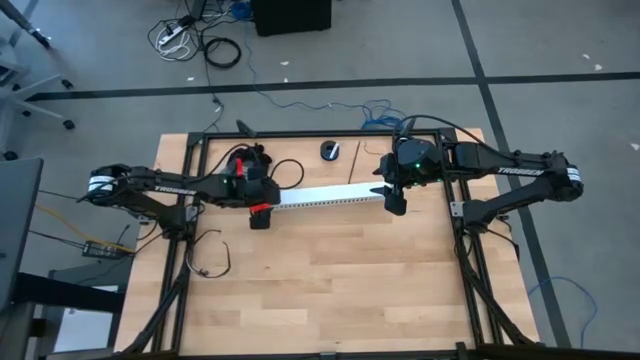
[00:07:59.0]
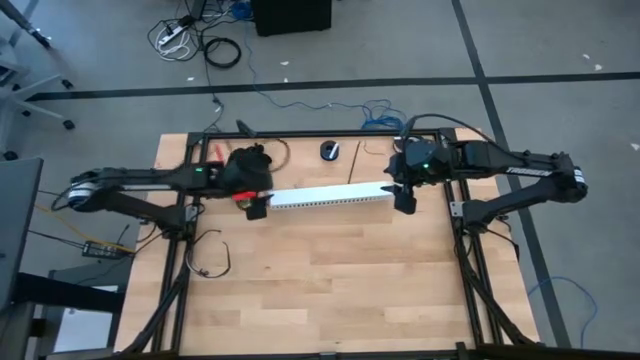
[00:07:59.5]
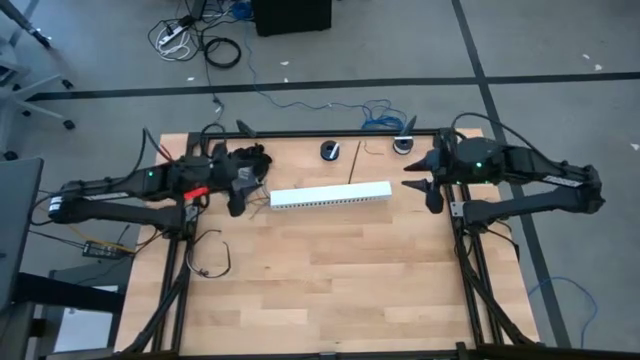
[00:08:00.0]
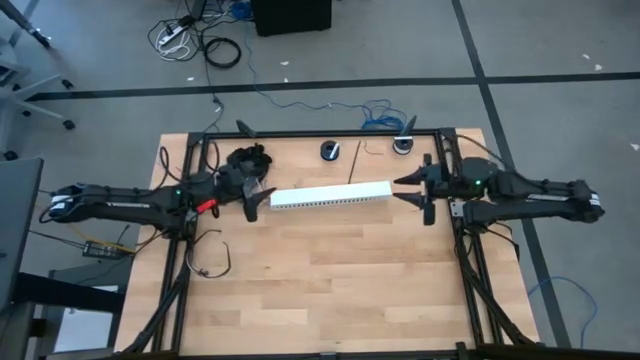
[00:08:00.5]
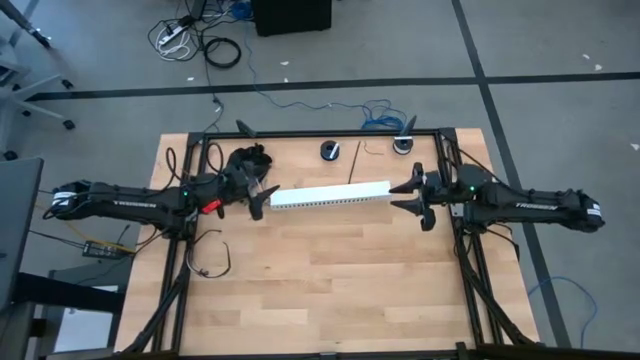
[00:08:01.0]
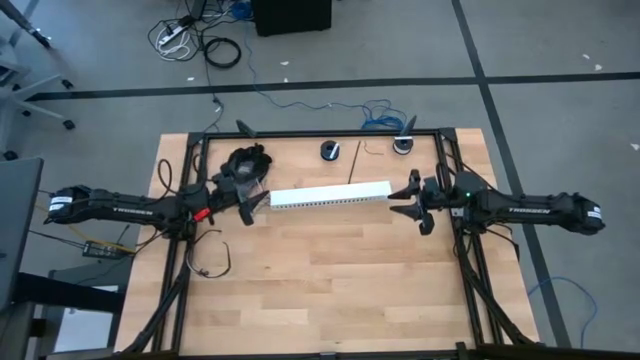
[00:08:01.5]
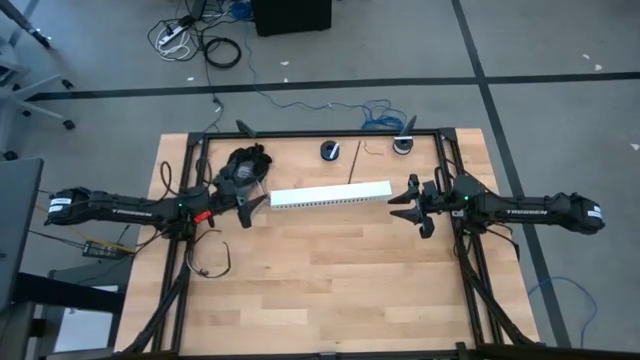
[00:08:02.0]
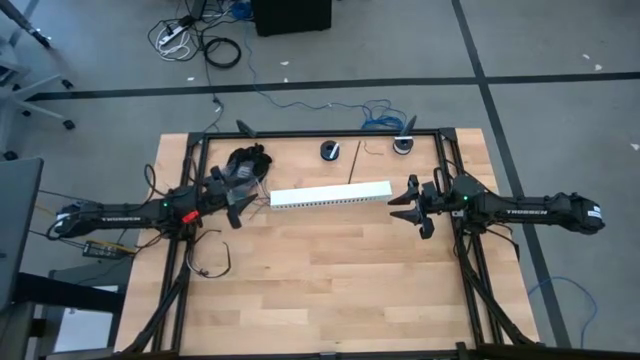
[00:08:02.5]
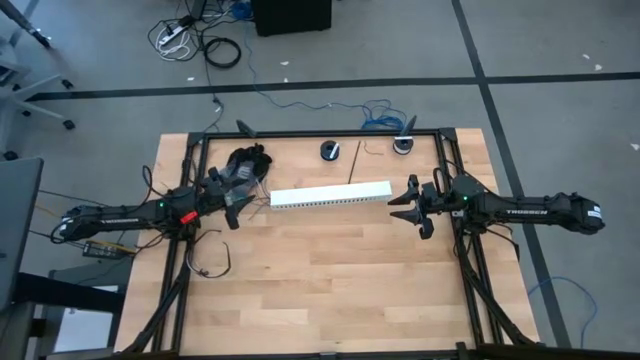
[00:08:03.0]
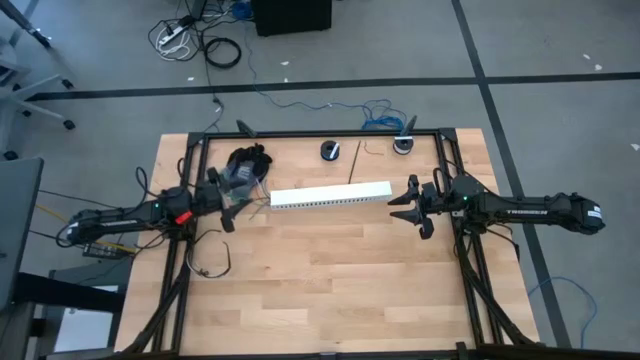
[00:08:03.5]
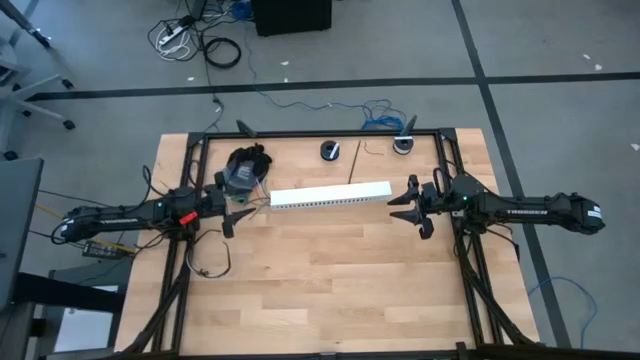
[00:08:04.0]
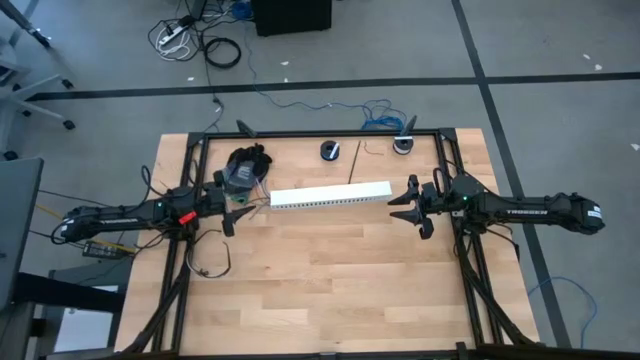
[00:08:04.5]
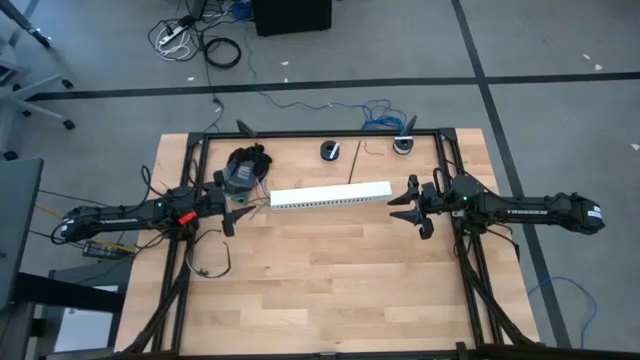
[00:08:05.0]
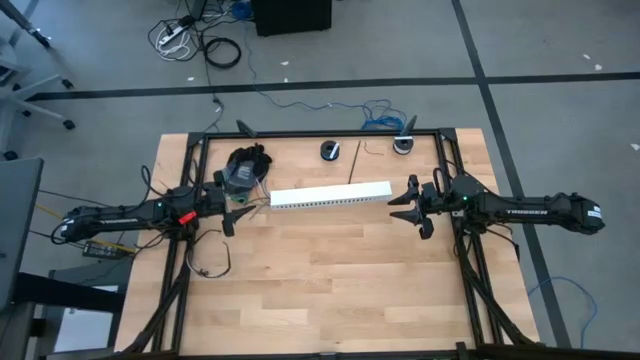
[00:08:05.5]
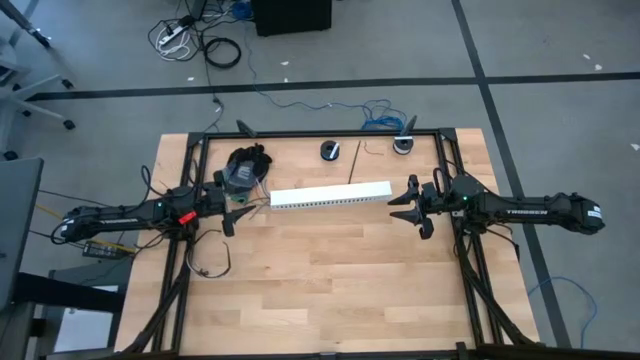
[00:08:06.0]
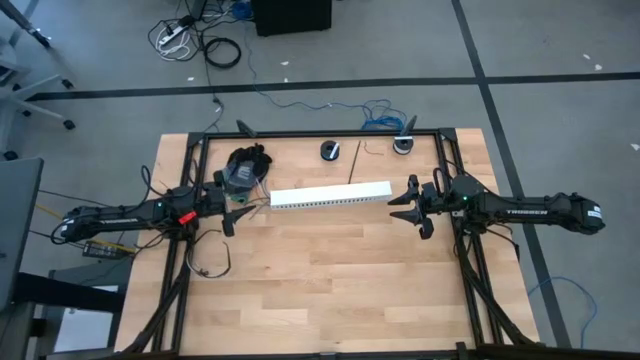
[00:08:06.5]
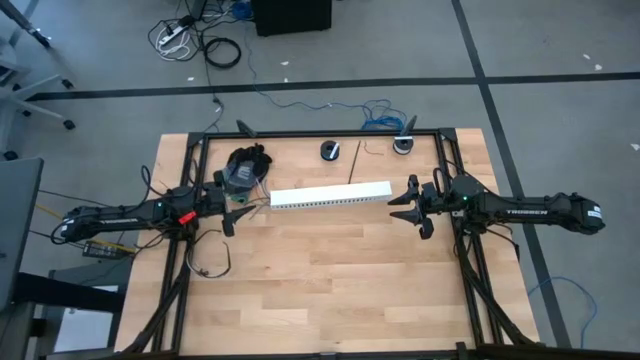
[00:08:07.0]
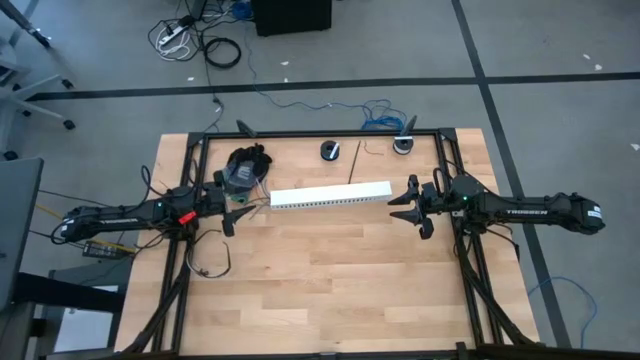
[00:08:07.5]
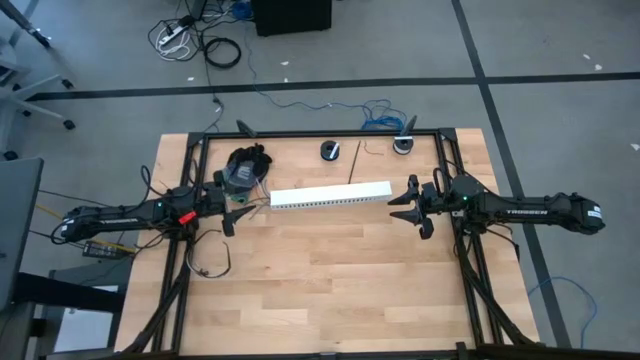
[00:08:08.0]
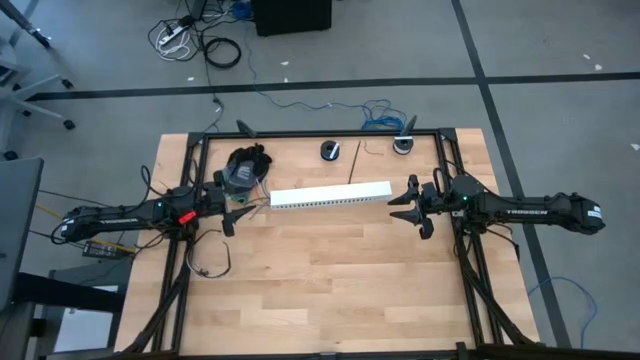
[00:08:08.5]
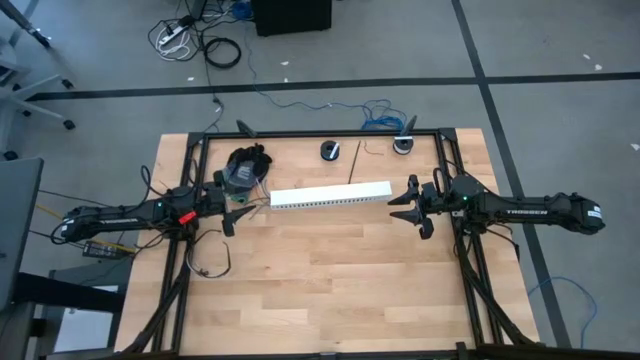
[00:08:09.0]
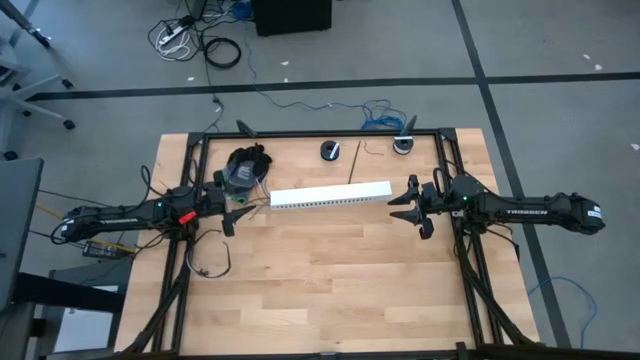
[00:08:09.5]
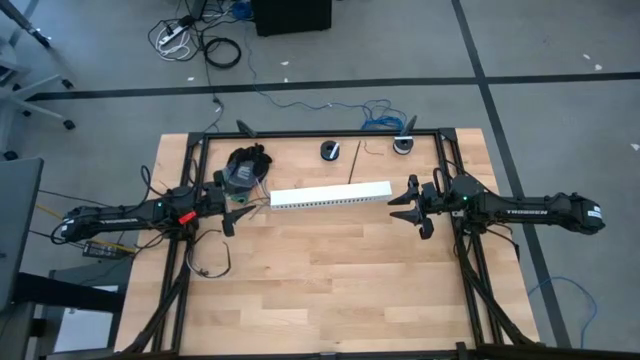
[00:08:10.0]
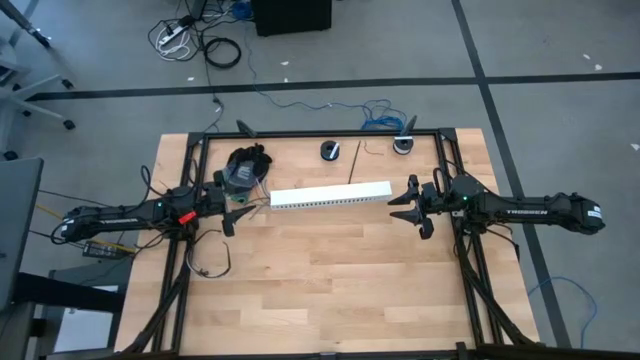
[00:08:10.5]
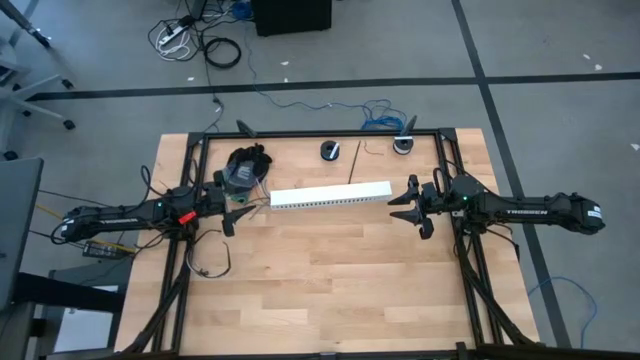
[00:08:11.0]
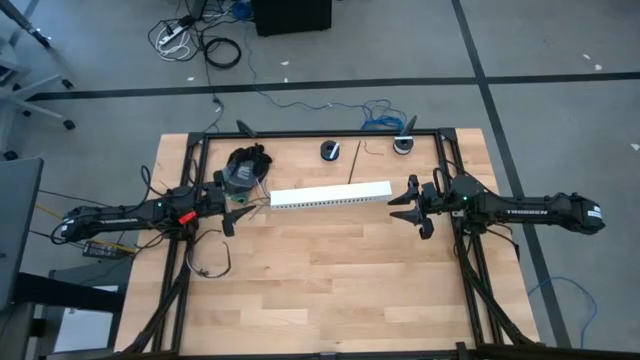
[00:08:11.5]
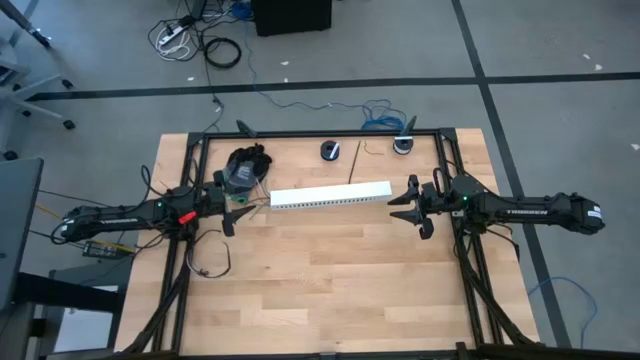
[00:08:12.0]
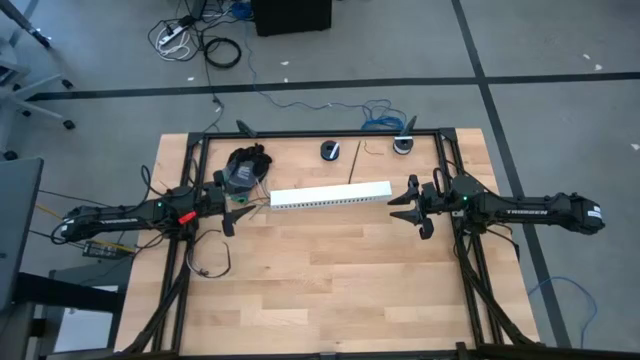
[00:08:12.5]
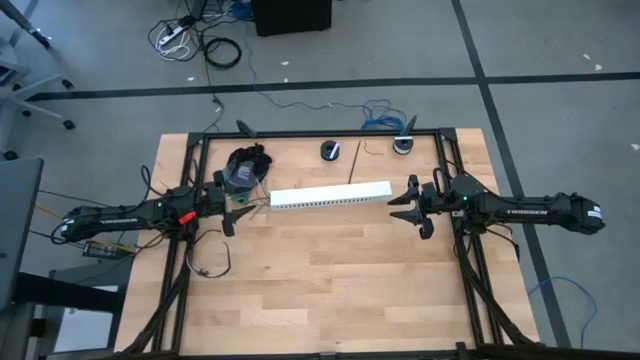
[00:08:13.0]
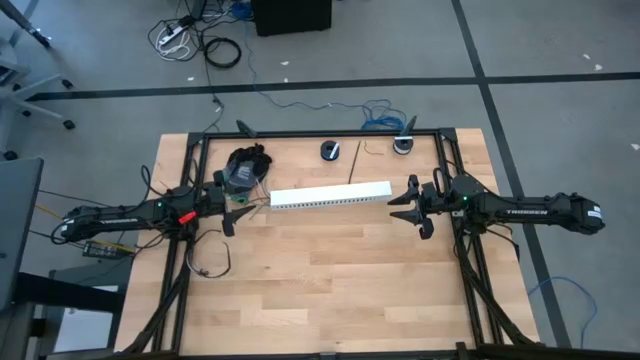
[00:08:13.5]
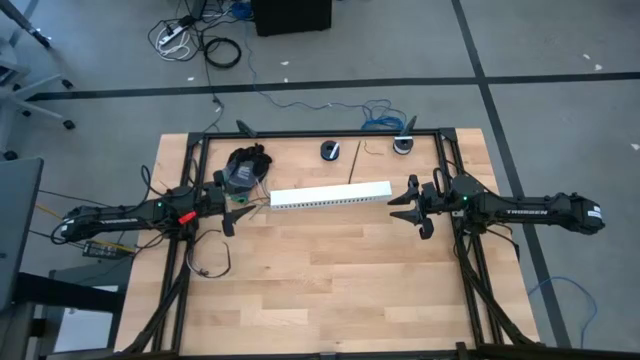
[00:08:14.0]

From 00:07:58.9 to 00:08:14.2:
Task: Ziptie cables
Return to Home Position

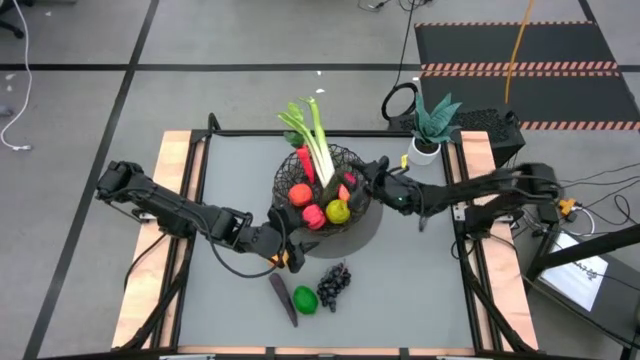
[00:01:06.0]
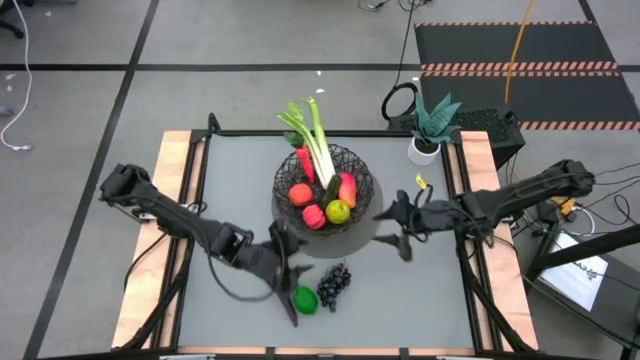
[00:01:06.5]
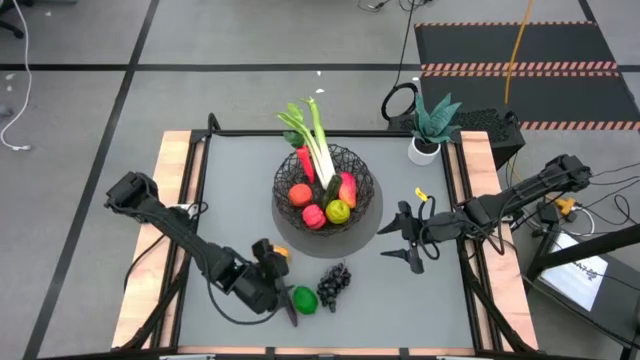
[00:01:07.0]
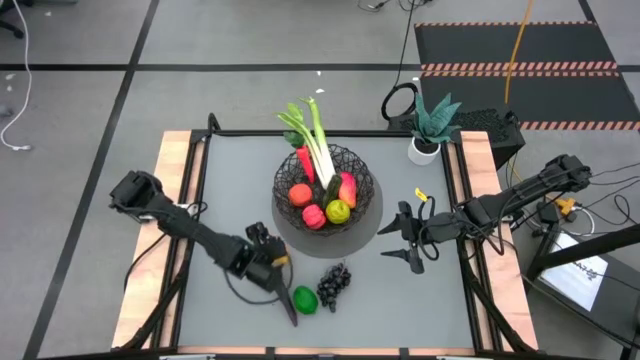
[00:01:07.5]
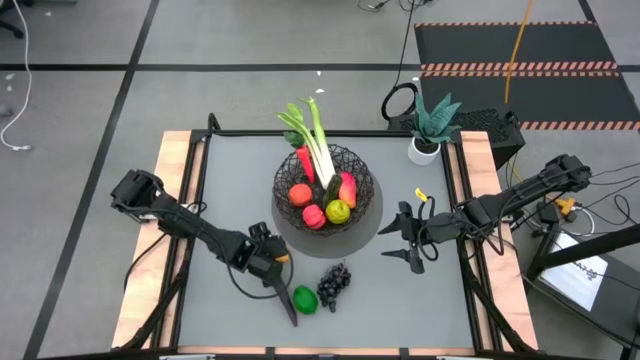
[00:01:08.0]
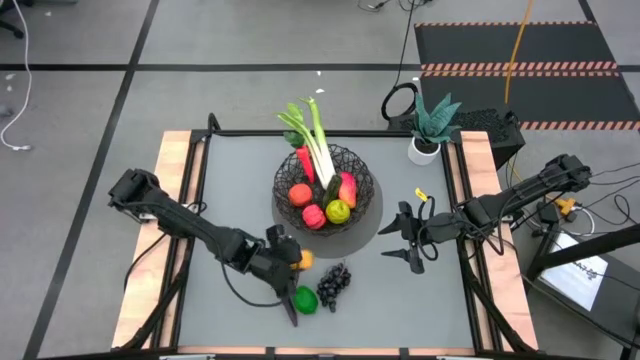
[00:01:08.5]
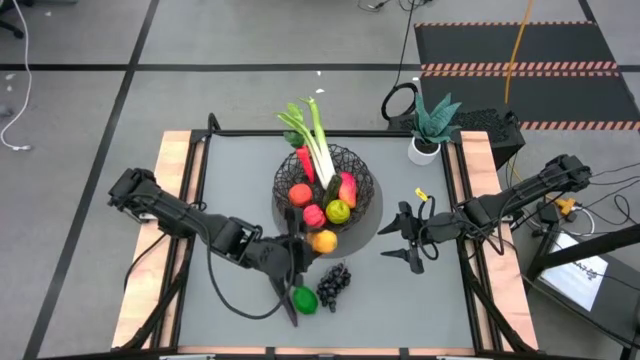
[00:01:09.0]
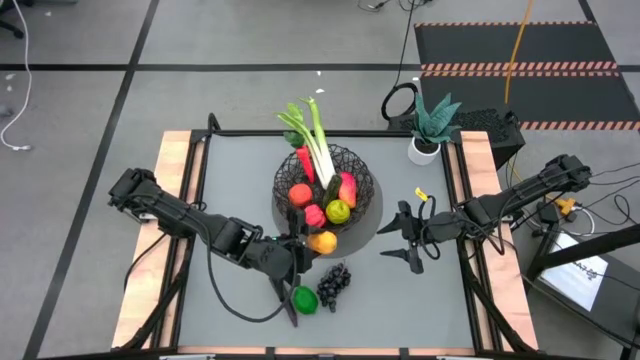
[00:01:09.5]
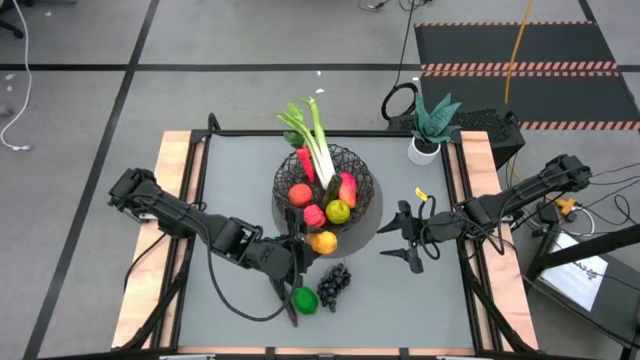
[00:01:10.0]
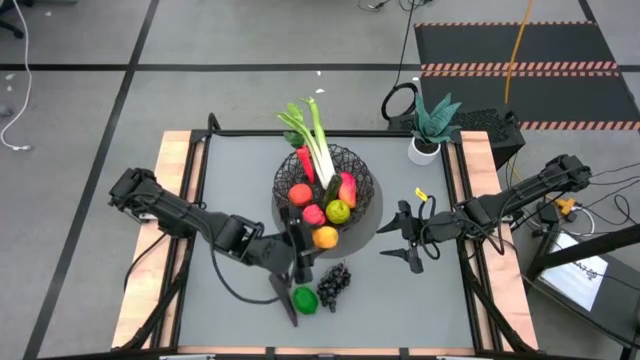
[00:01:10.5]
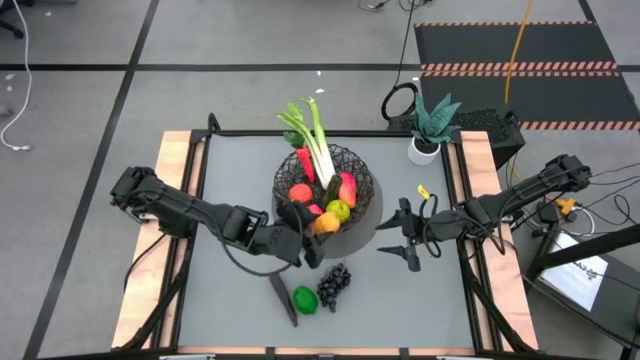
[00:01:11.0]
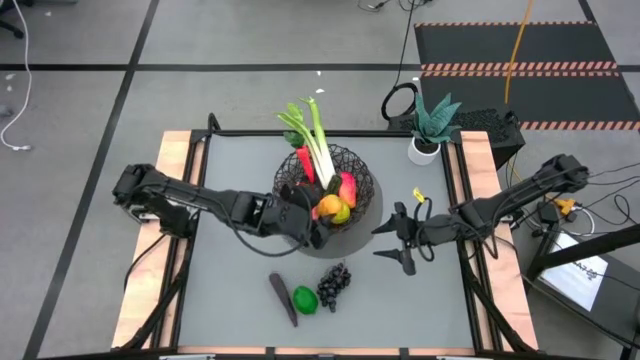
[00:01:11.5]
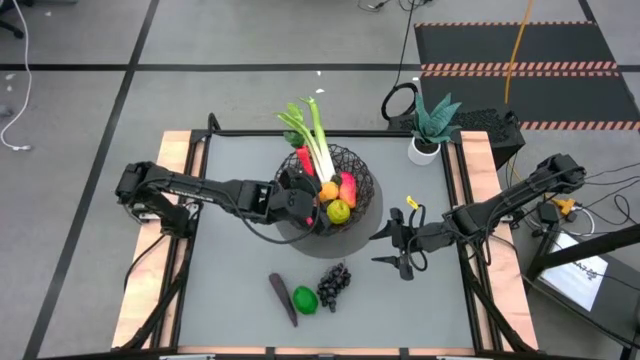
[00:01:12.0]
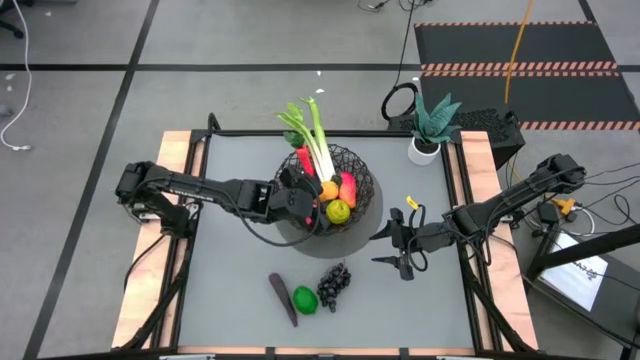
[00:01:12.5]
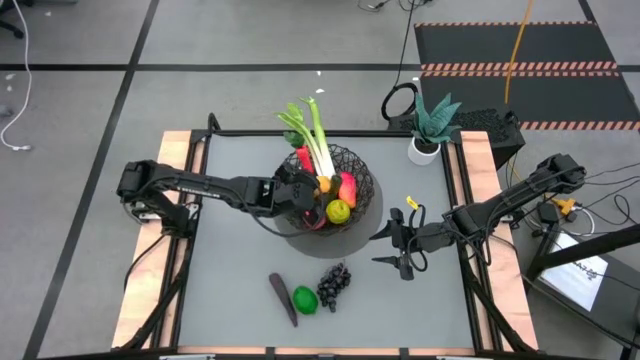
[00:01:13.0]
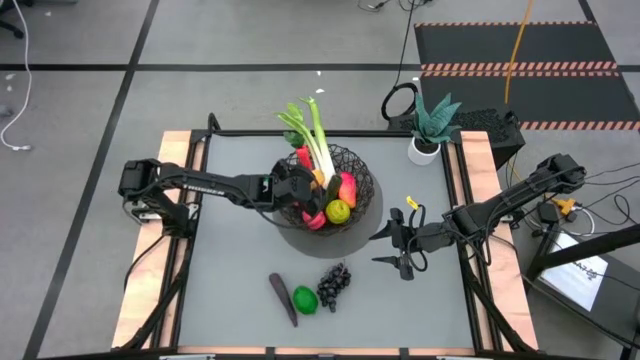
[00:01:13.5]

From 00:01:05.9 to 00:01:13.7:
Task: Build produce basket
Put the yellow lemon into the black woven basket
